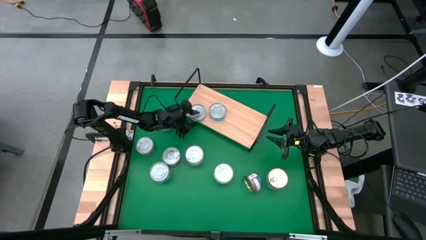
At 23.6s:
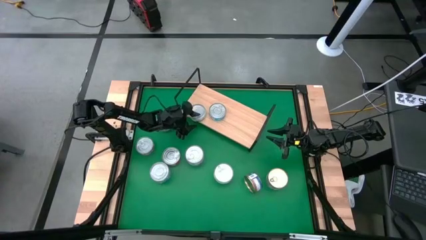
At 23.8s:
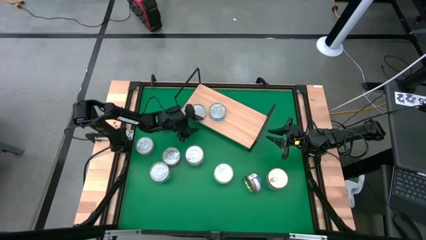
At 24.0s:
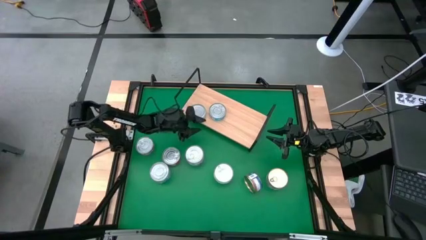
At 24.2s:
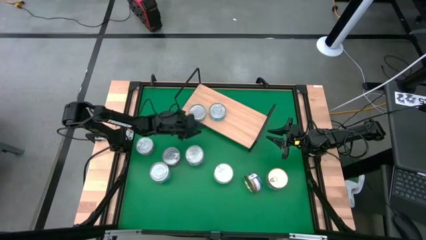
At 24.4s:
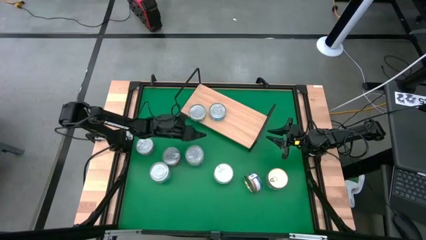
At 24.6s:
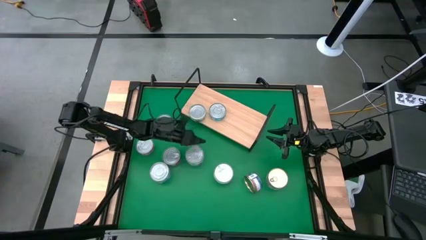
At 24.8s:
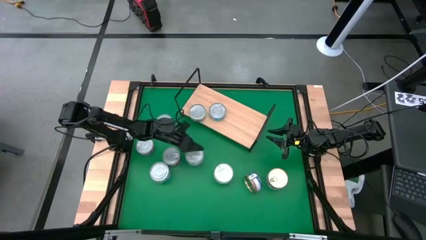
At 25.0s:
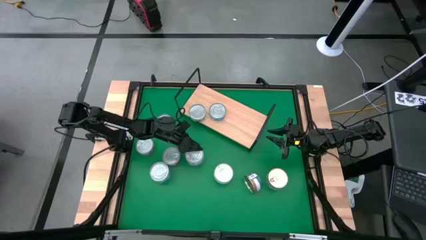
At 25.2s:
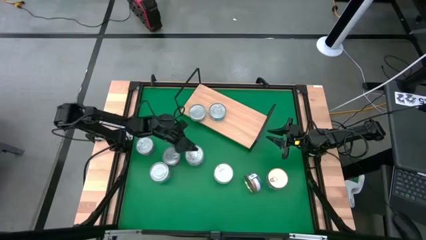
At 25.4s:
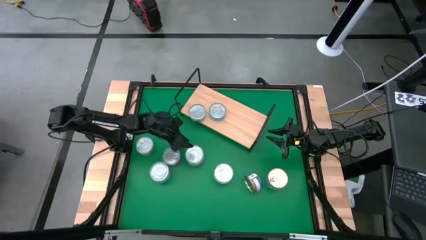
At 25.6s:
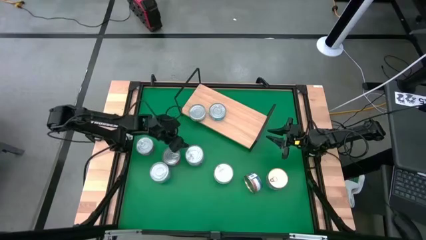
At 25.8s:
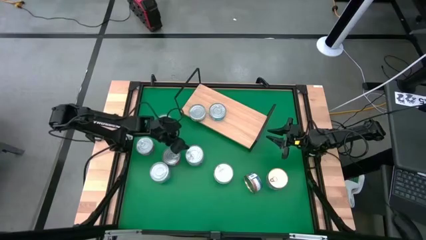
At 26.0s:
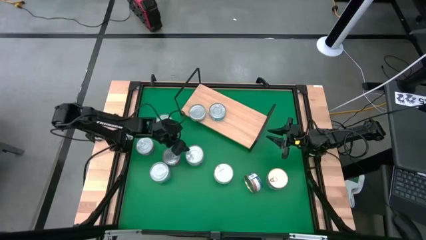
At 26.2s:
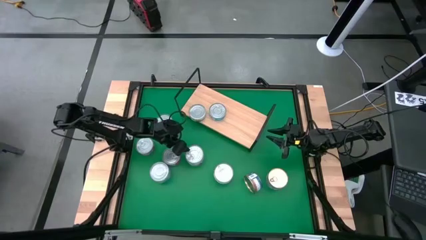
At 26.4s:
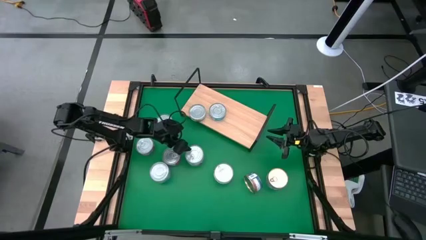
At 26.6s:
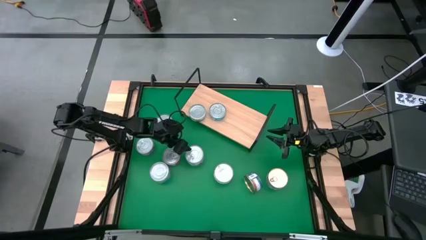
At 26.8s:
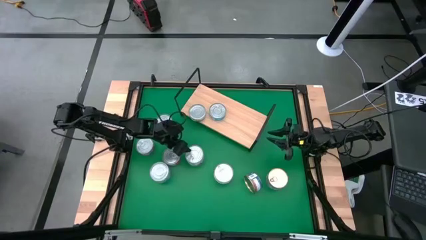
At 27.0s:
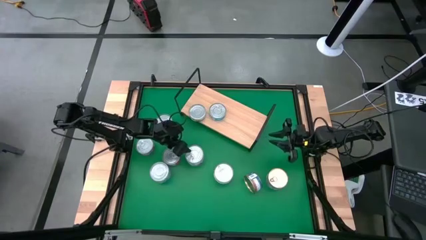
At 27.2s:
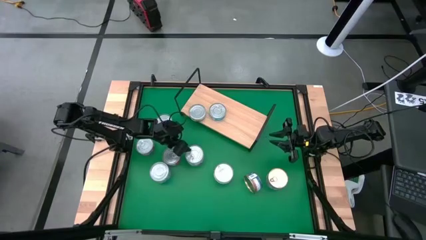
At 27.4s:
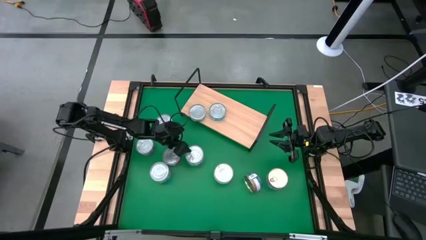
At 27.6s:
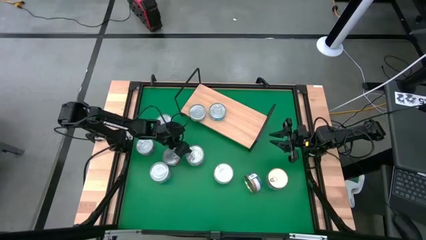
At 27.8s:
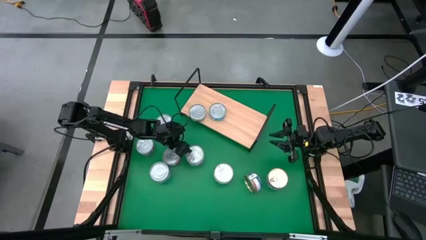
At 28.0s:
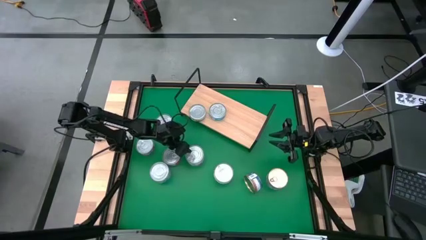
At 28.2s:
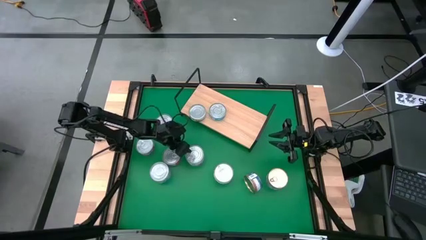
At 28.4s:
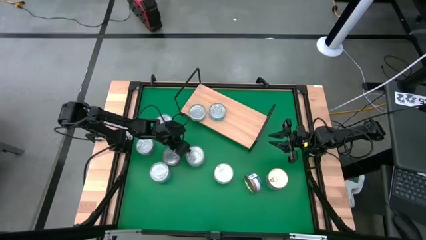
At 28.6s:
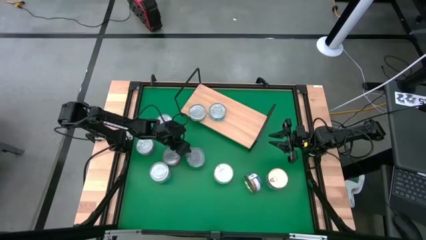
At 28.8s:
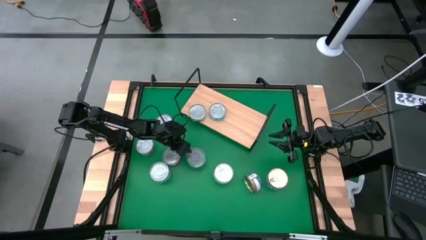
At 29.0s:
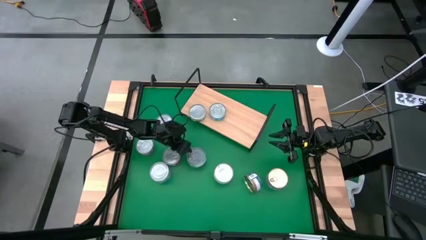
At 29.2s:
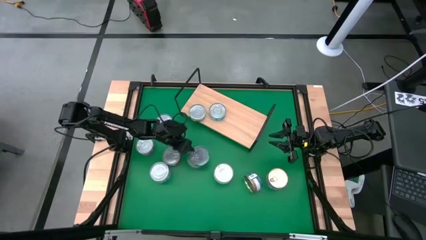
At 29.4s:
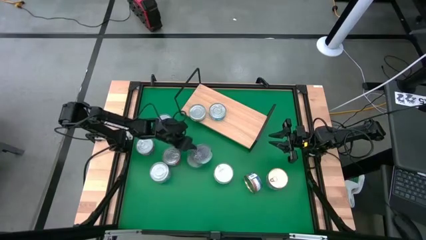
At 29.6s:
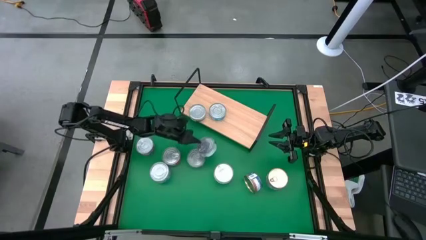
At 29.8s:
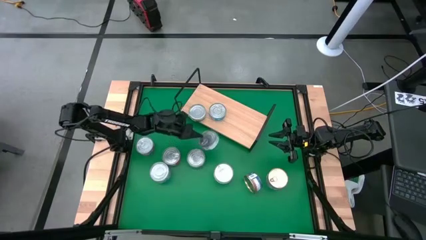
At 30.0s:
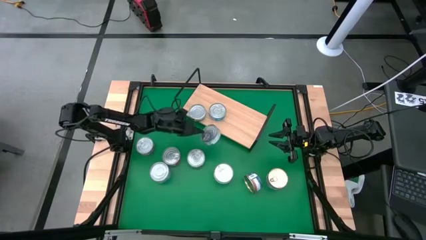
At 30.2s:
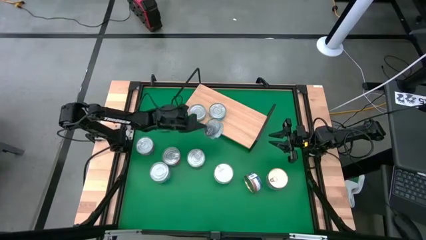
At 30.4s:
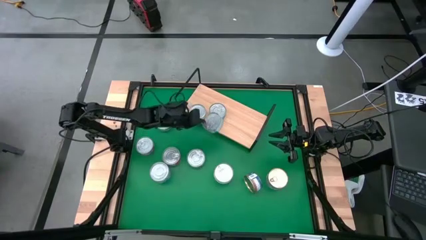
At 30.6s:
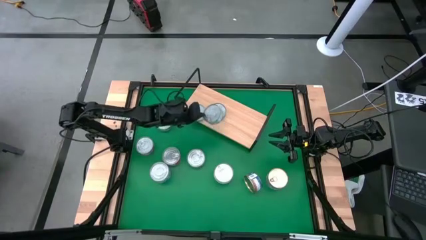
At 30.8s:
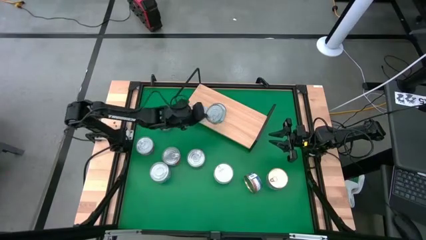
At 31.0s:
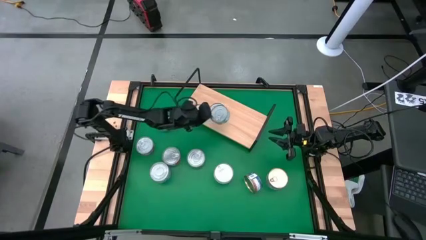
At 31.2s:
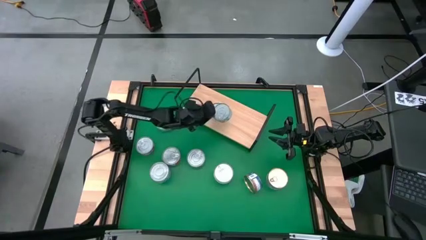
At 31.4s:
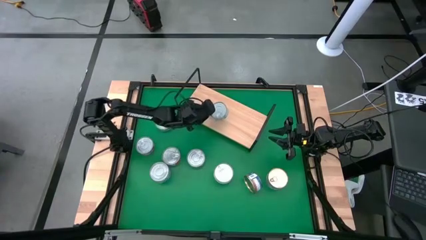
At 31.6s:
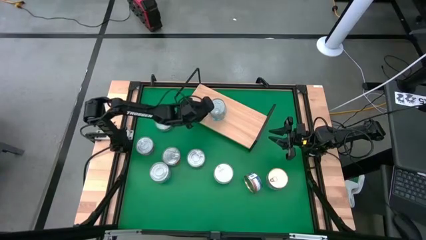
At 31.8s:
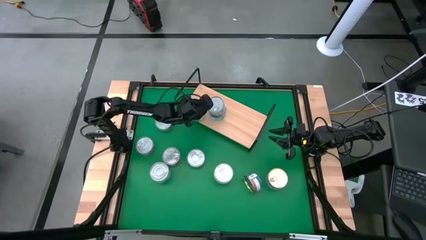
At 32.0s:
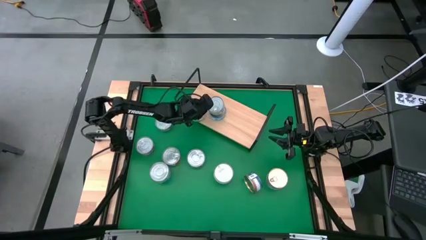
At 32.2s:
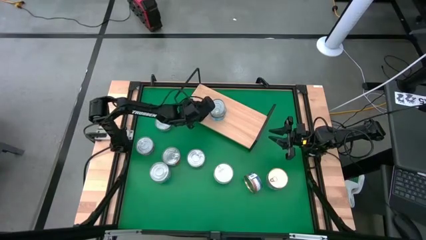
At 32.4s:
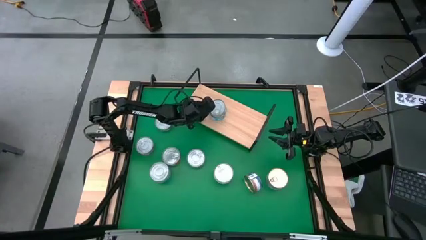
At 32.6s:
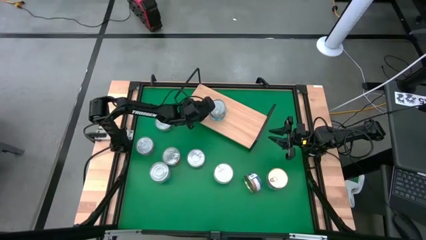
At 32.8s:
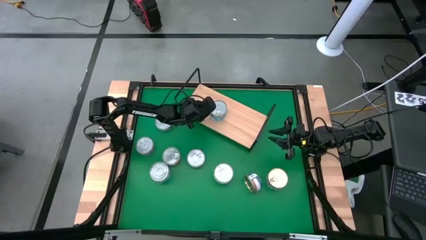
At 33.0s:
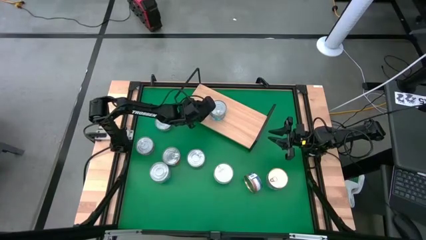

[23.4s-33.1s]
Task: Stack canned seafood by type on shelf
Stack the yellow-blue tuna can on top of the yellow-blue tuna can on the shelf
